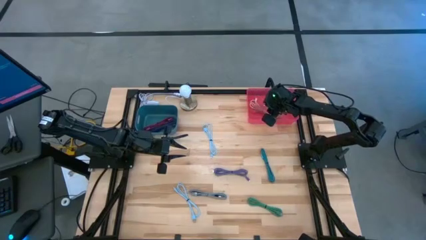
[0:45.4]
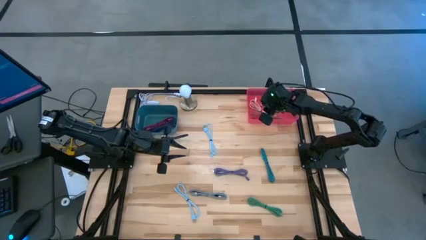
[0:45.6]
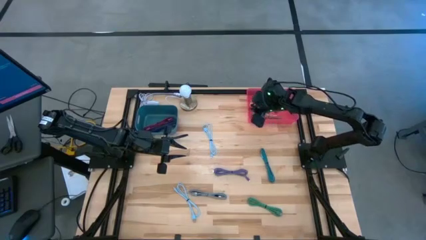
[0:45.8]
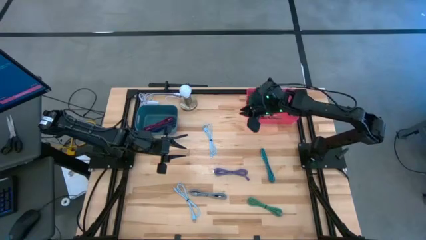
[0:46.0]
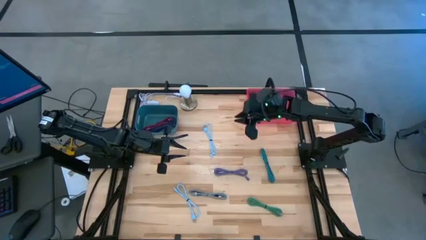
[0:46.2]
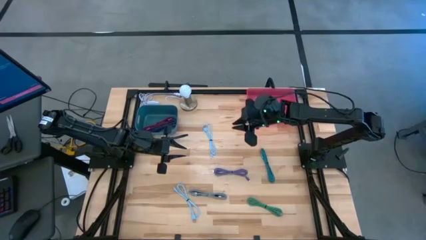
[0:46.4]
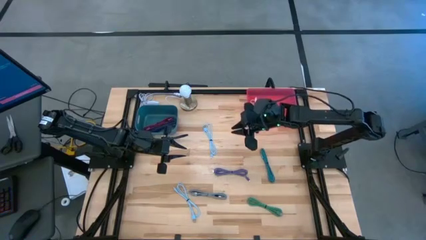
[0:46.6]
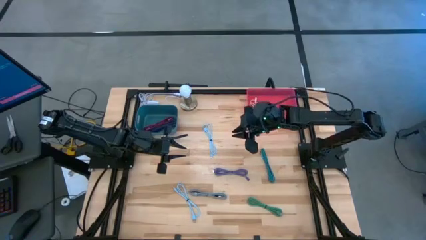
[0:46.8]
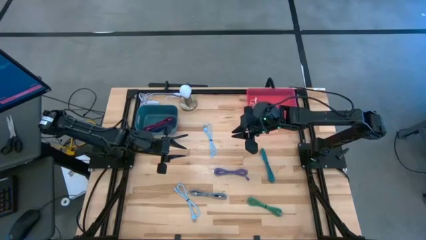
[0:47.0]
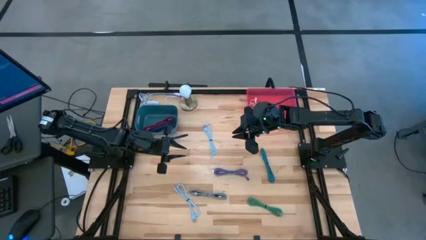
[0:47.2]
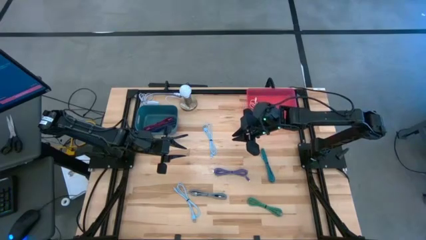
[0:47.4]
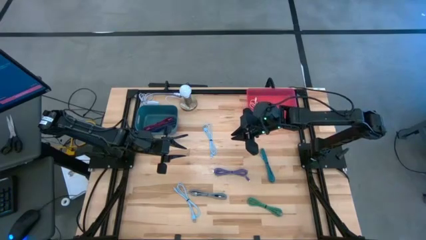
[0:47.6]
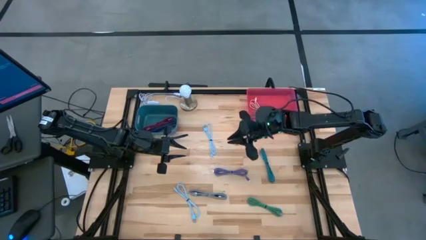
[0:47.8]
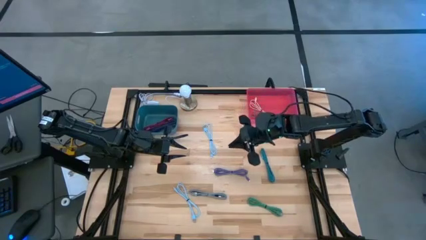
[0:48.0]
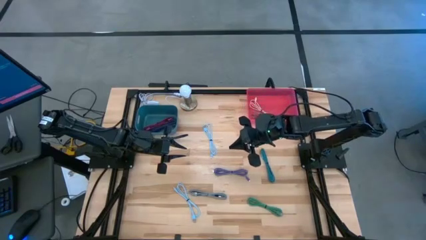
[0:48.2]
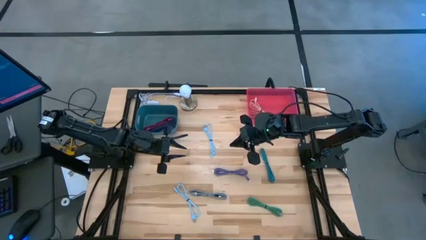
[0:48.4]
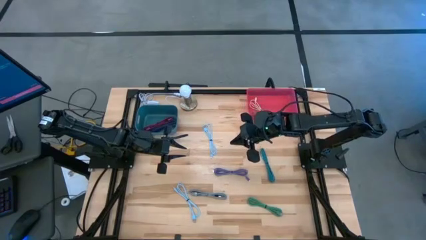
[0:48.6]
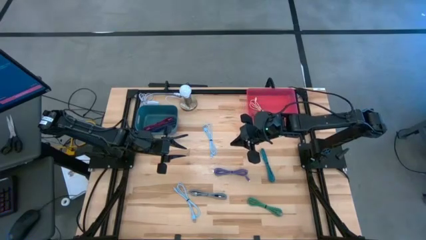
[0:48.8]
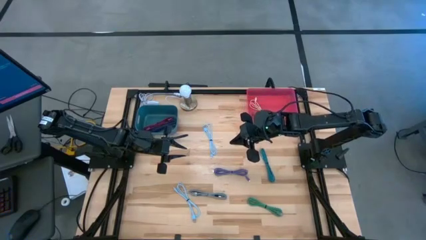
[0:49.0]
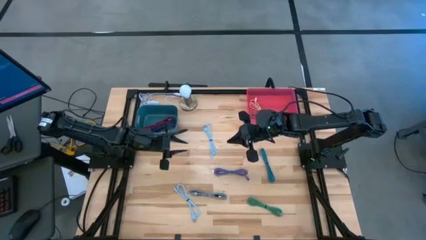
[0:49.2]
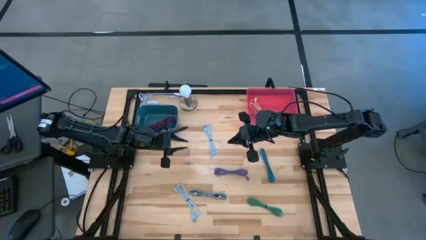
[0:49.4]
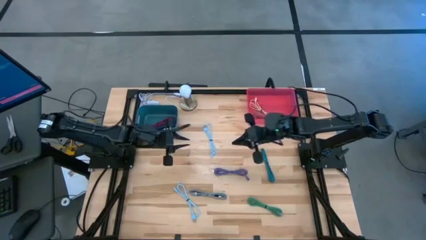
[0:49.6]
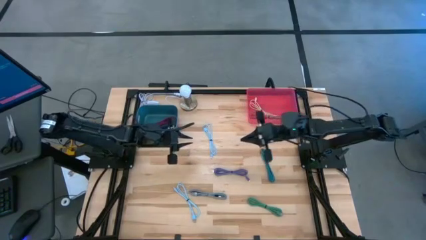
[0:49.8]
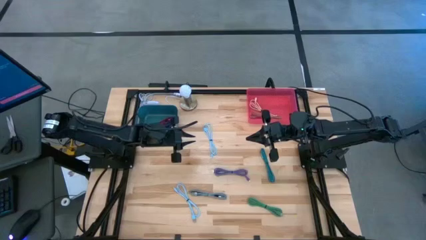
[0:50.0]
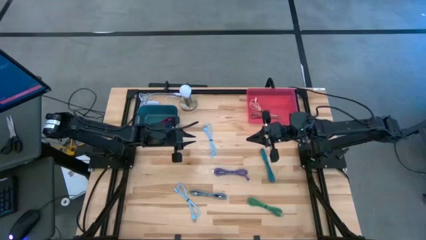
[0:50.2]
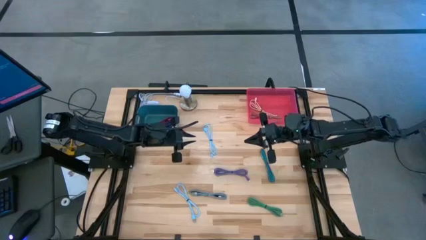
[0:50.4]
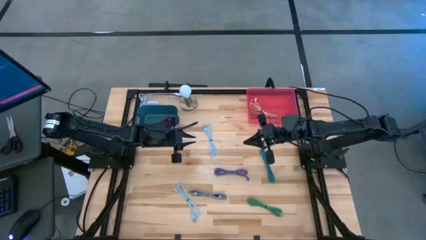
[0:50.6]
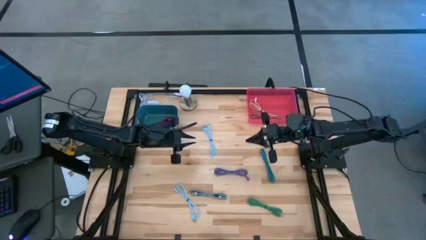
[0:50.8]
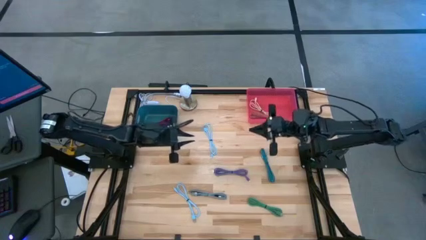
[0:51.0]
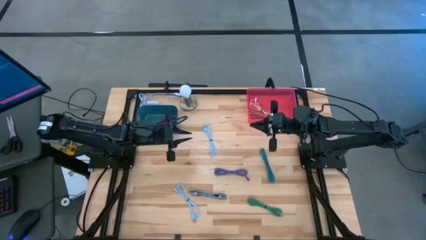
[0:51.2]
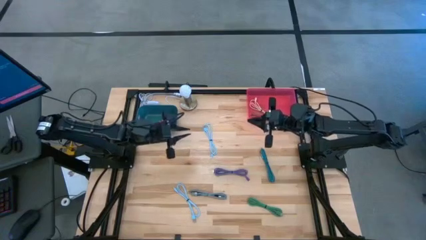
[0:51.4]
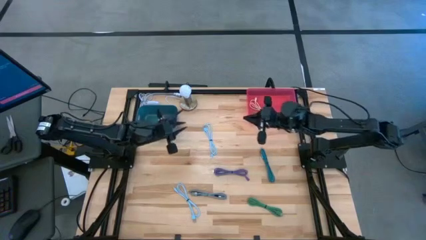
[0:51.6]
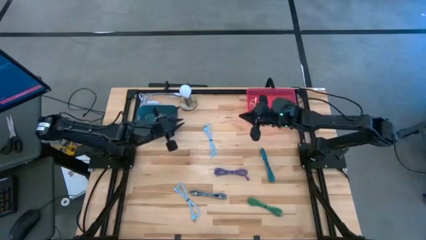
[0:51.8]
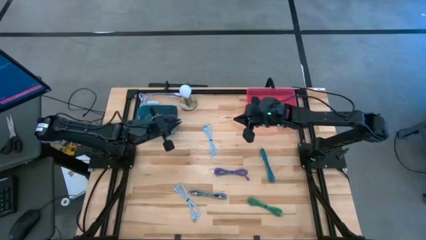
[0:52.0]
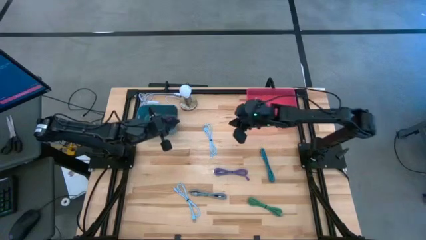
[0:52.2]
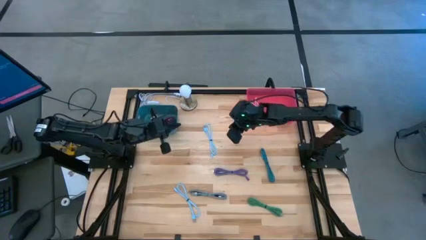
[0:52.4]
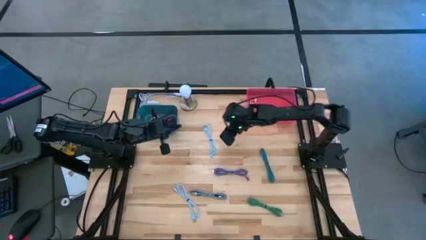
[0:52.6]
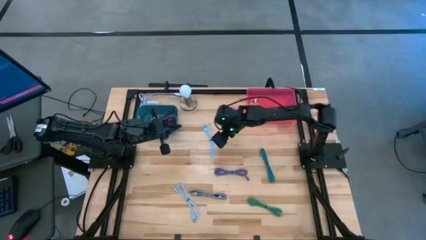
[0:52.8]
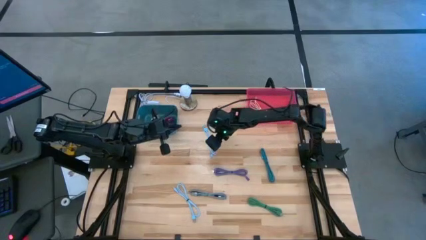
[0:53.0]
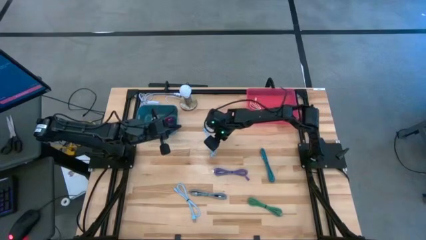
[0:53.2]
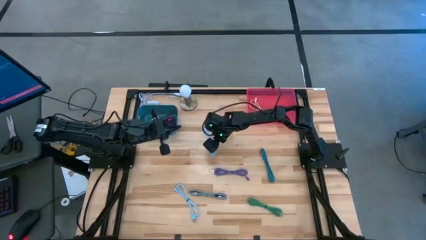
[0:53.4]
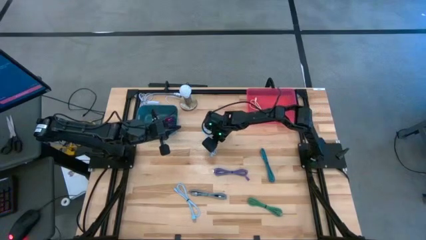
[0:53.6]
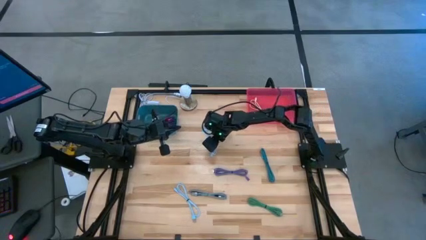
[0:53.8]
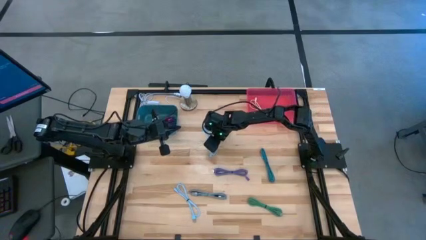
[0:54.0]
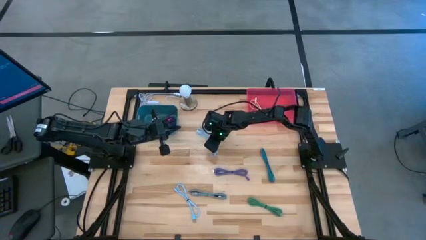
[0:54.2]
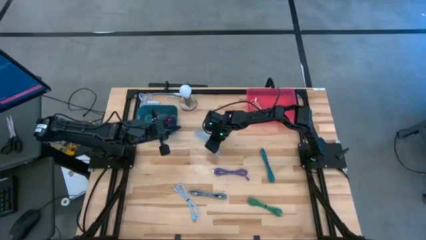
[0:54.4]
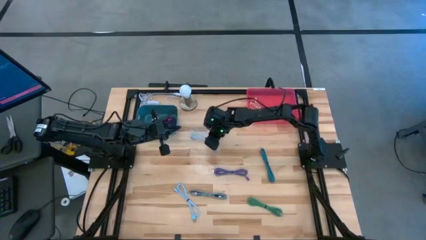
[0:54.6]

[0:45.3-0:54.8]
Task: Pick & Place USB Port
Put the top plain light blue charger cable into the pink bin

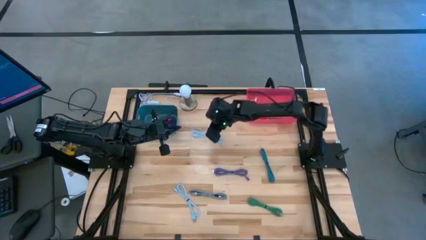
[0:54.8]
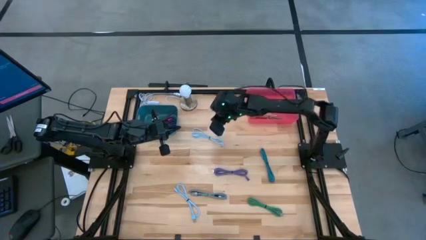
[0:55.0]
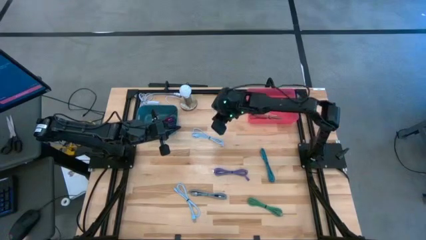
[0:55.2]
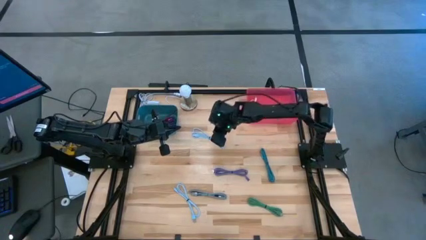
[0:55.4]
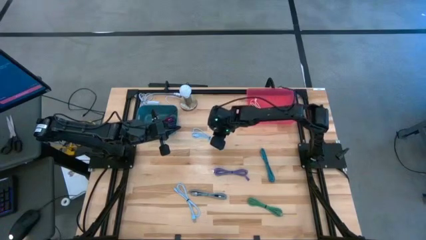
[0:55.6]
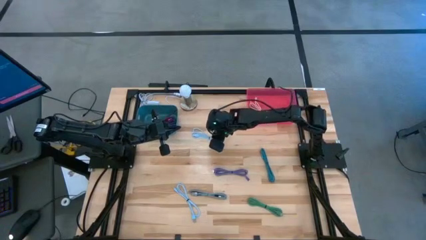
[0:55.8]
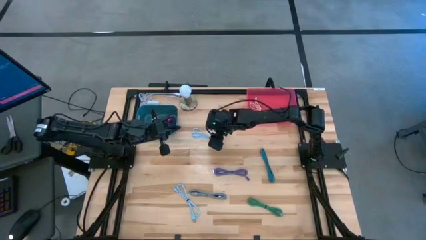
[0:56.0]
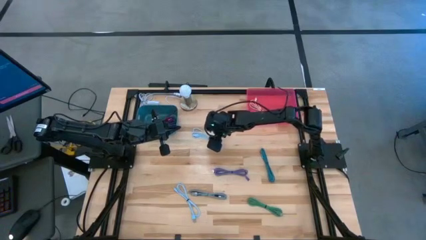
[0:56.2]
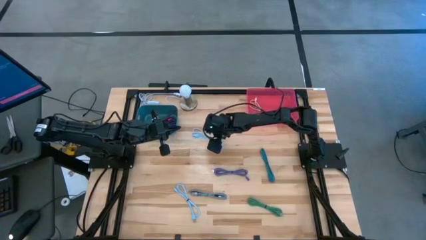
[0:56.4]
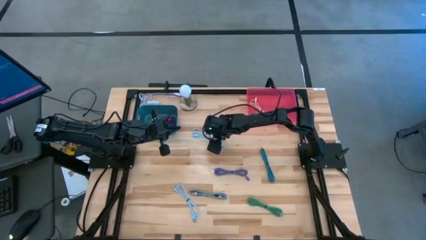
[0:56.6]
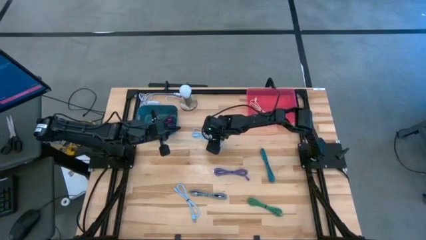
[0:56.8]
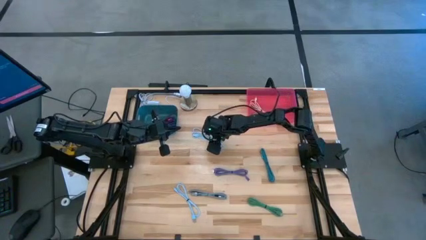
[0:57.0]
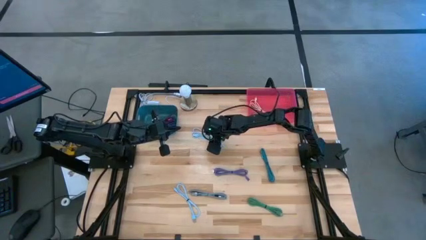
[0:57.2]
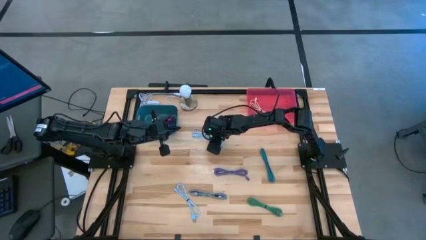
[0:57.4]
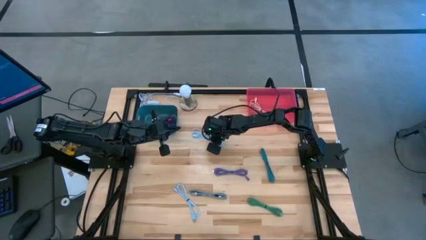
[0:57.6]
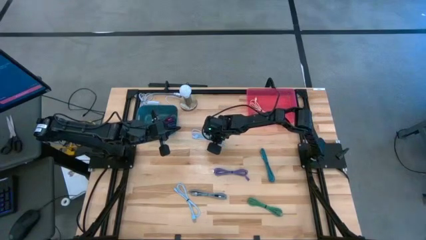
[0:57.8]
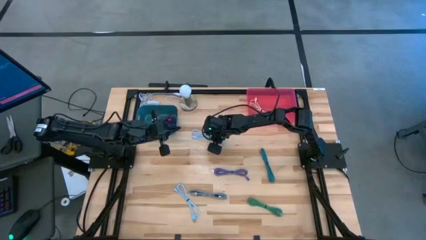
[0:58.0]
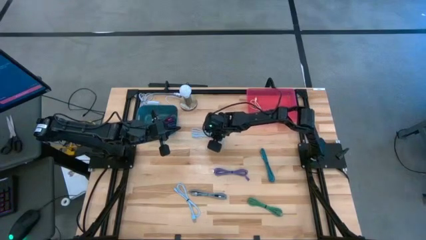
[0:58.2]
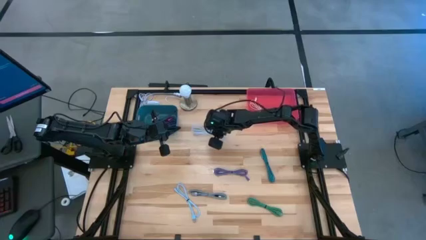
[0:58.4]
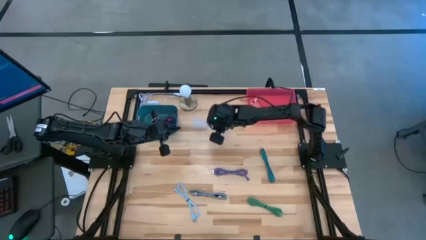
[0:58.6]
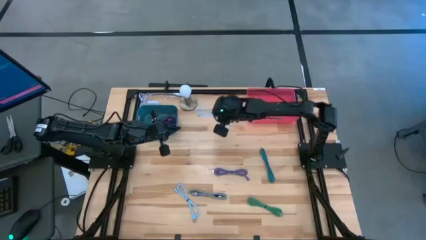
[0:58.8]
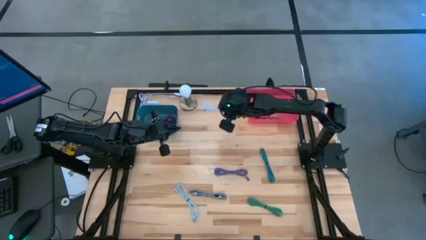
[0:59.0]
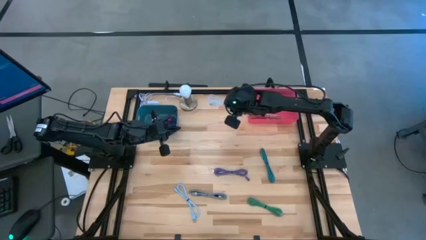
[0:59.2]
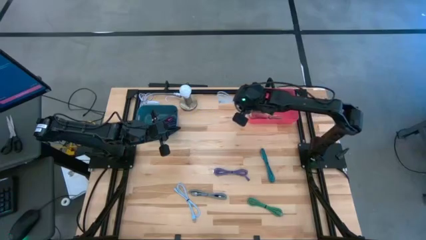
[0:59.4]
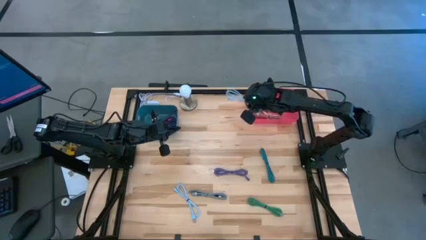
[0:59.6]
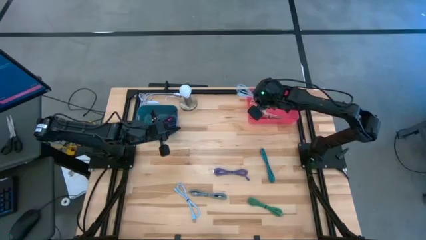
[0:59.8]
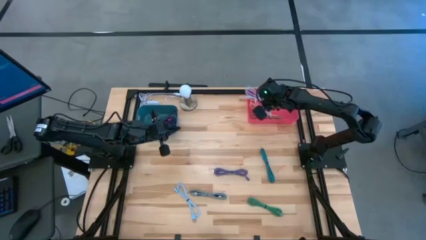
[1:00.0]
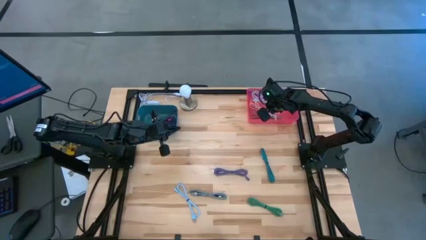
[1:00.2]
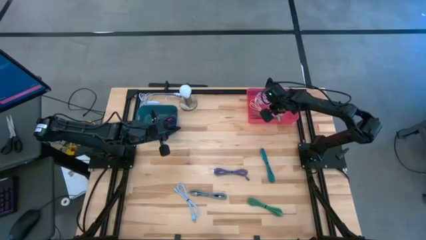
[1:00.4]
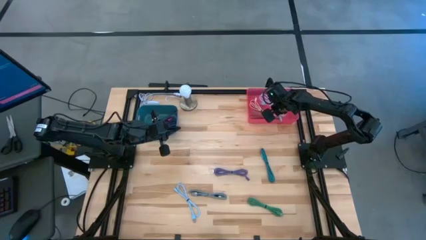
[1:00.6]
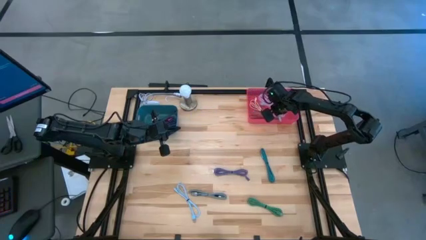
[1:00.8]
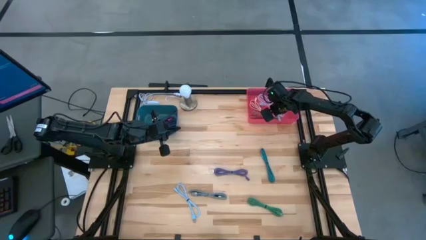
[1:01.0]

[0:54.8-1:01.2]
Put the top plain light blue charger cable into the pink bin
